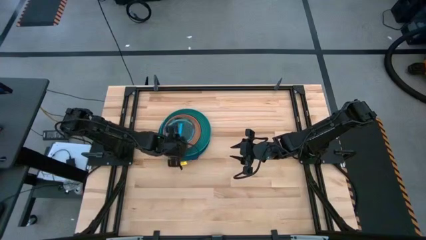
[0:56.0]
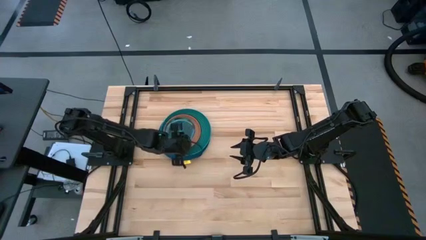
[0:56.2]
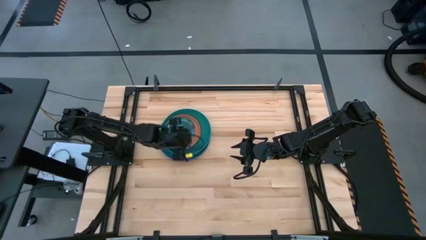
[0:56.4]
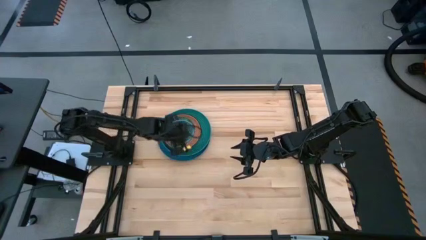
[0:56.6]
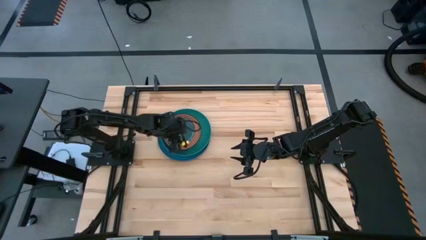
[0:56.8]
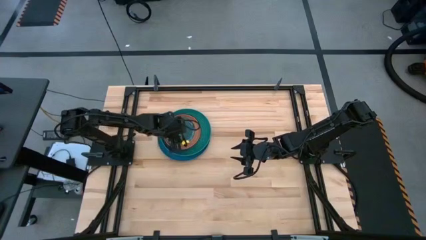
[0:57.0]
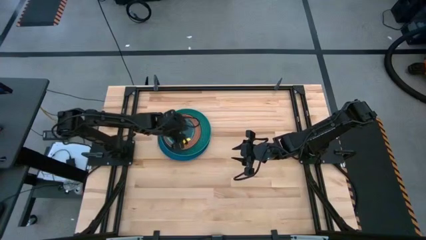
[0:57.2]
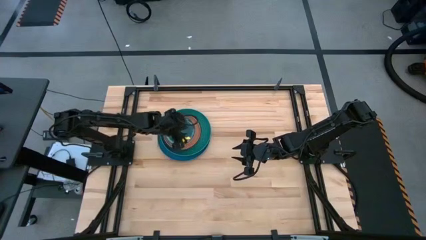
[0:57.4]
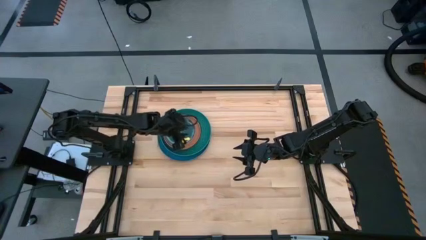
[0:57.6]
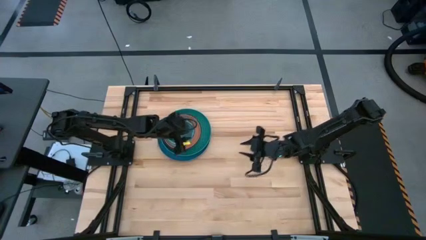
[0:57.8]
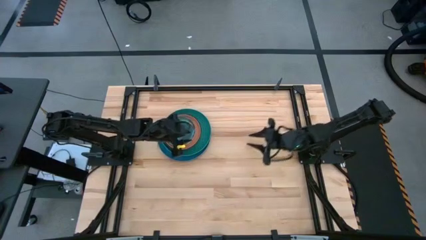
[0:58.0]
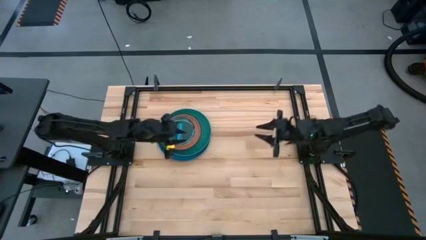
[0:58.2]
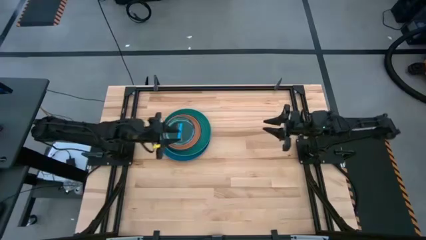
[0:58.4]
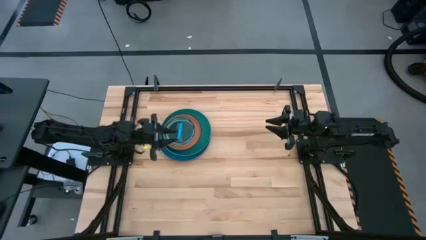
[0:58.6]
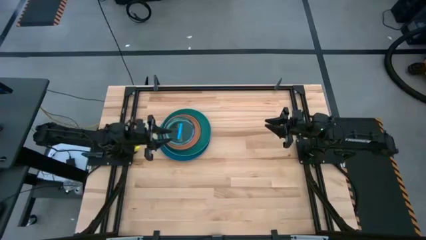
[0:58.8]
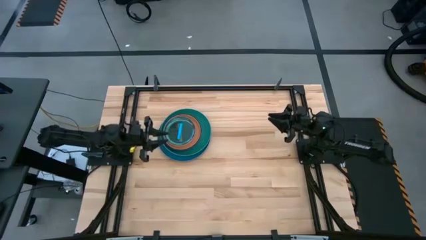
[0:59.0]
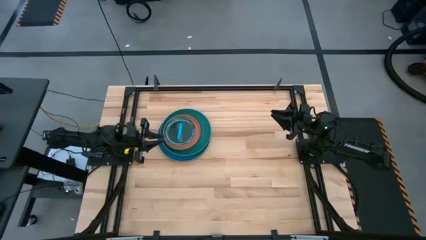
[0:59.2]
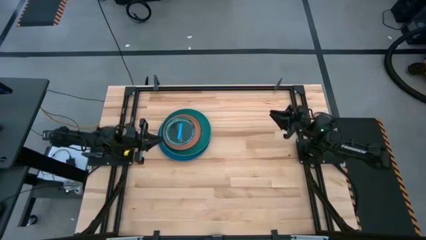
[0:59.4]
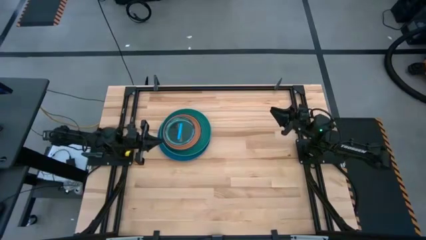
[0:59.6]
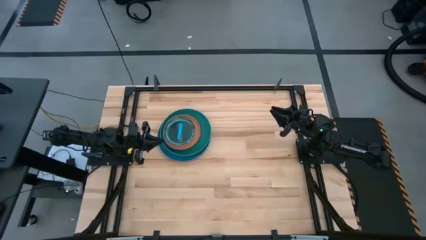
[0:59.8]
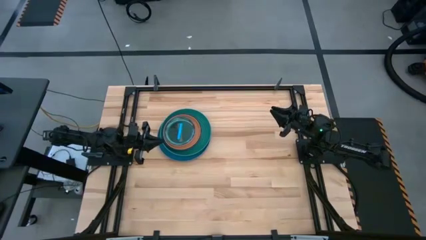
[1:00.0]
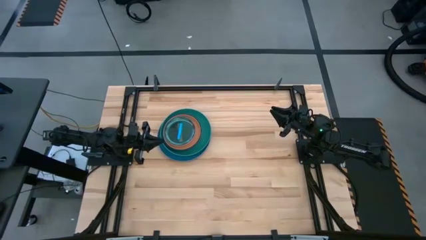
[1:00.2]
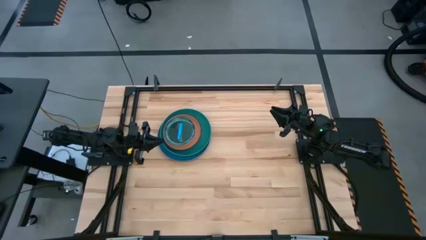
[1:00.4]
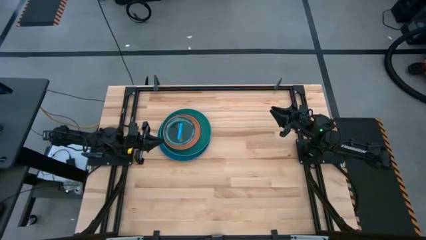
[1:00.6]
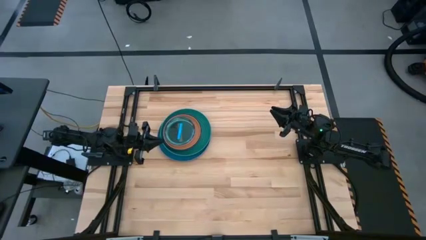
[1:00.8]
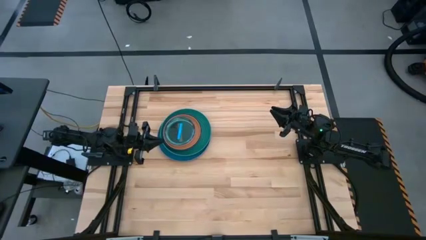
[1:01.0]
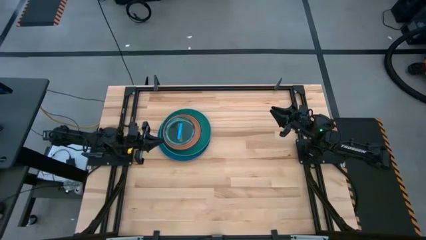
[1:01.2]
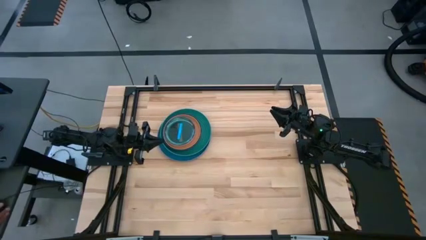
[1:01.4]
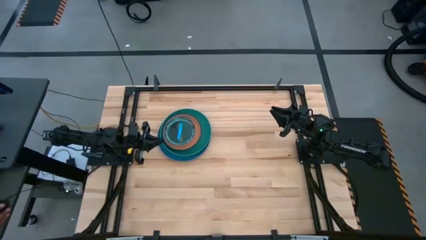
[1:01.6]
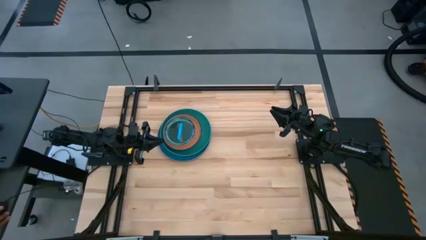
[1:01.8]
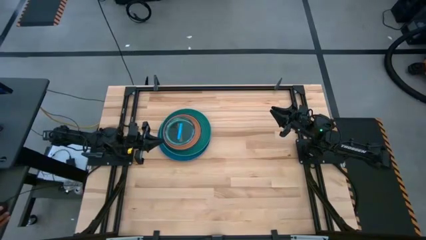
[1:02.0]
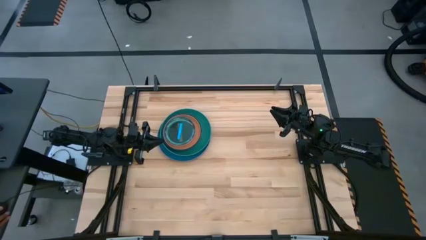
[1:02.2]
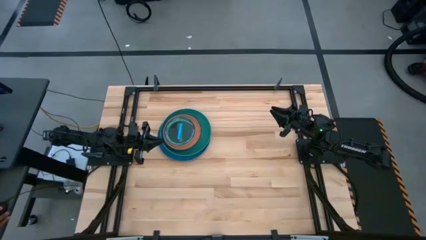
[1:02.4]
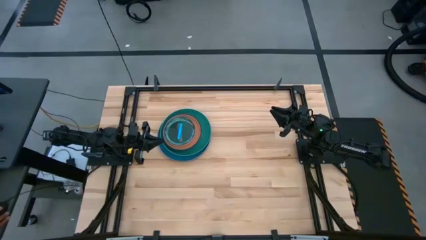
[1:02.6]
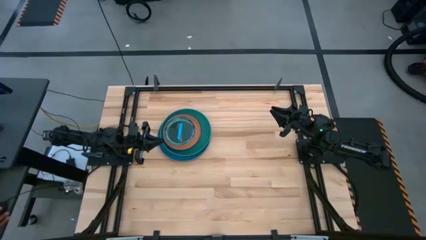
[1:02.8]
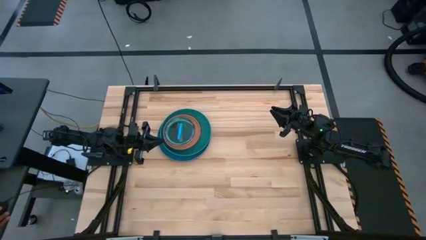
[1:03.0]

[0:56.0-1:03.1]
Task: Stack plastic plates
Return to Home Position
